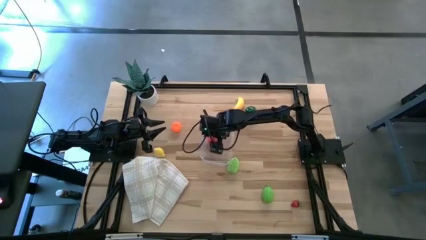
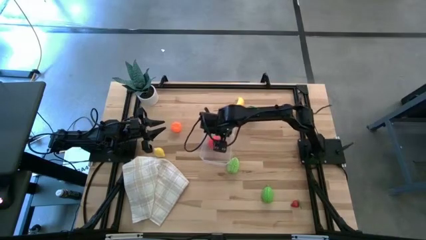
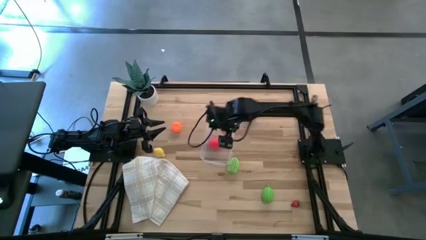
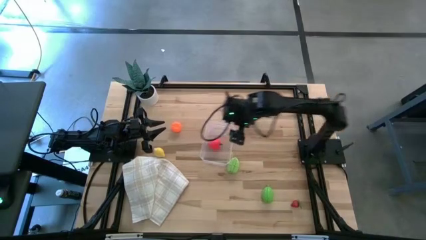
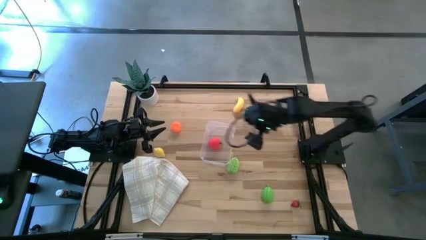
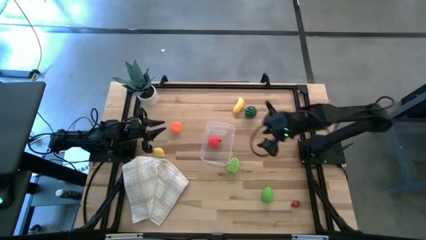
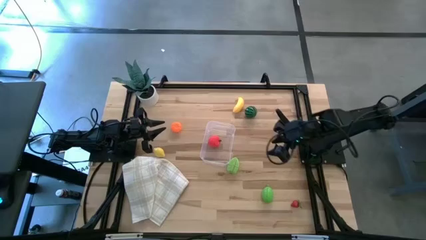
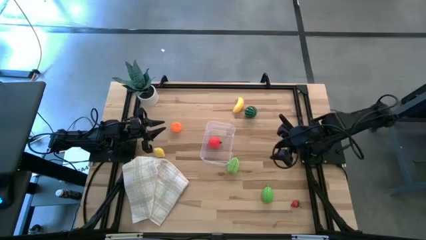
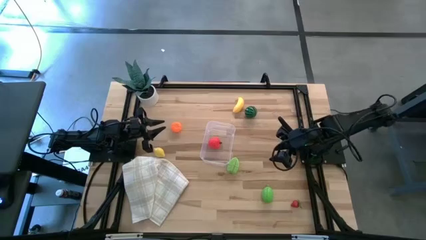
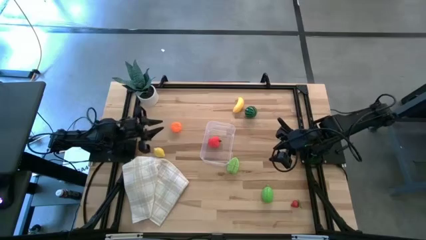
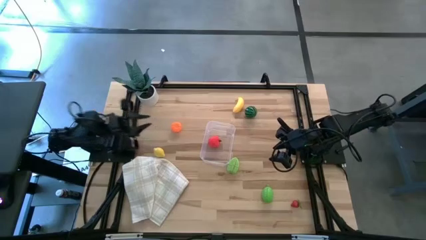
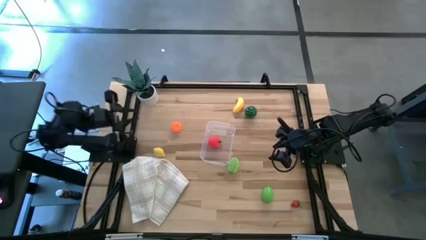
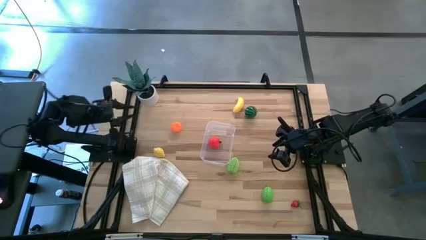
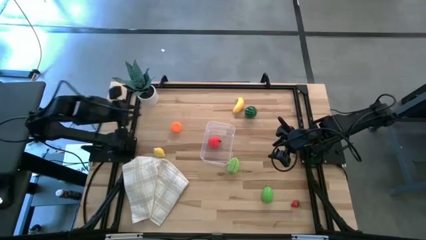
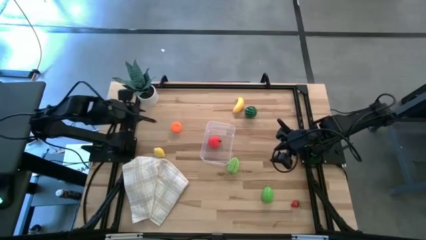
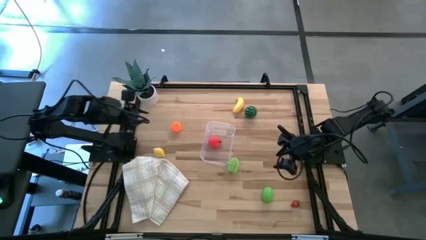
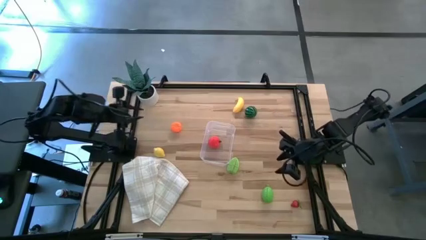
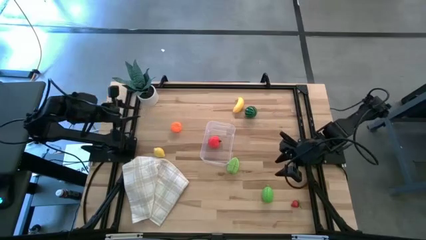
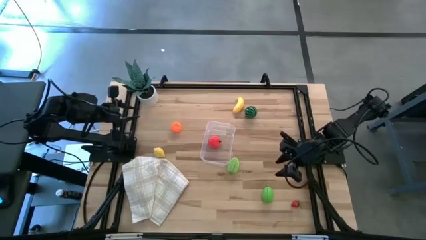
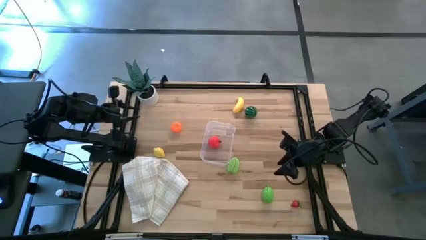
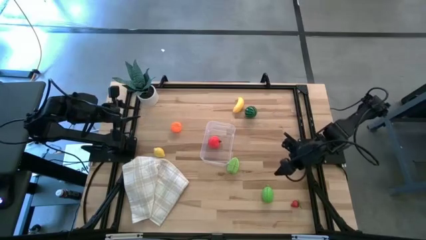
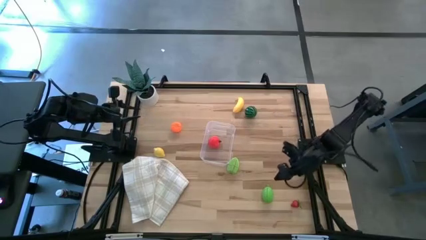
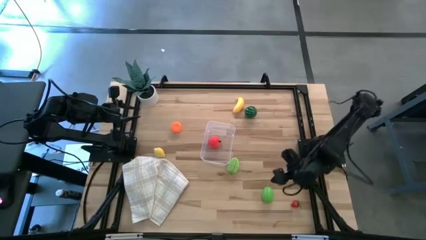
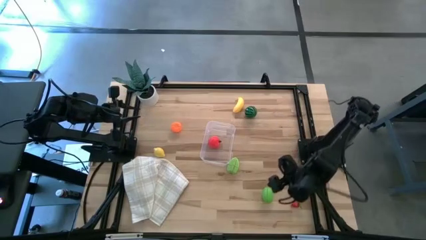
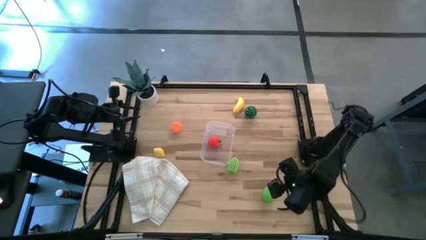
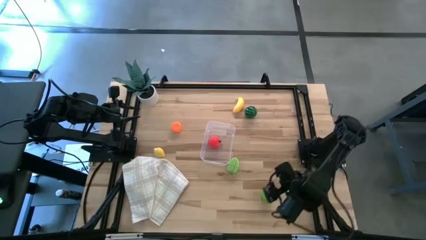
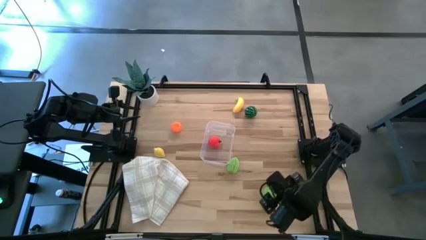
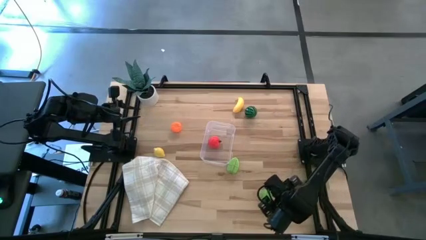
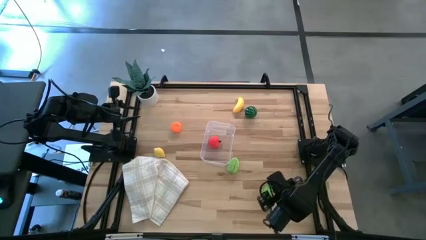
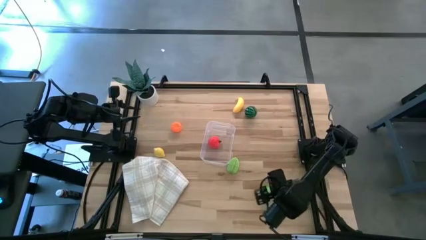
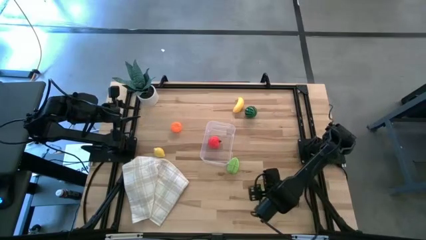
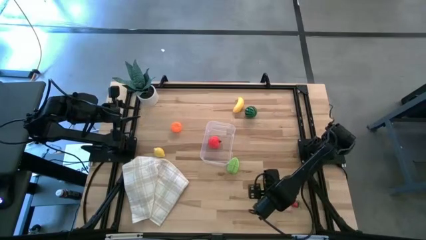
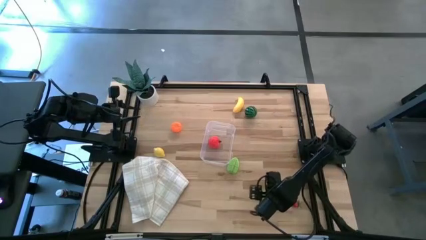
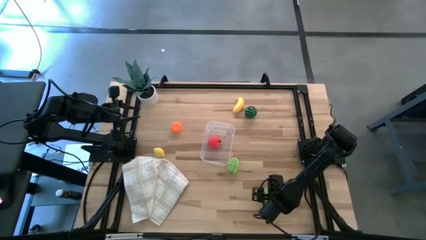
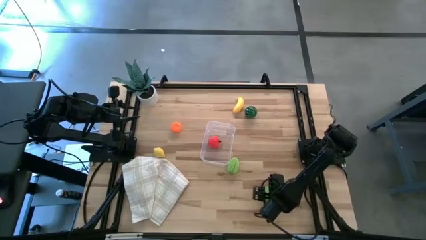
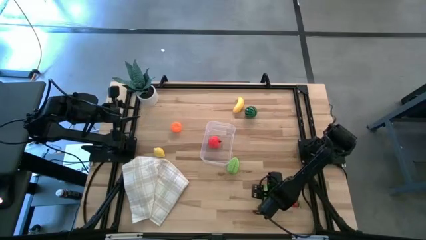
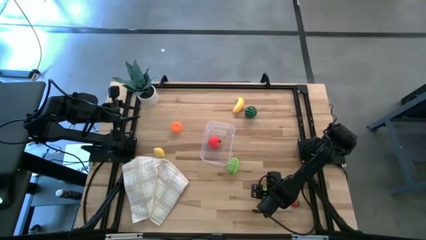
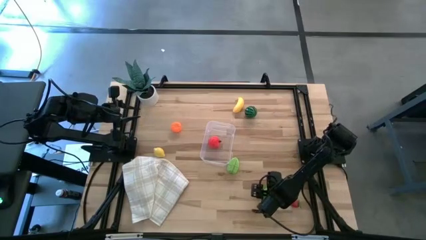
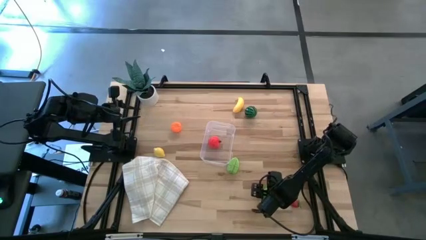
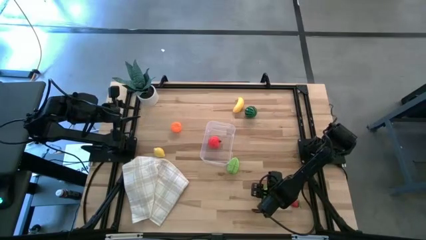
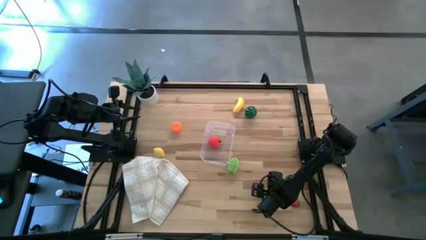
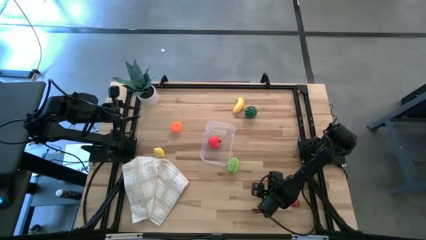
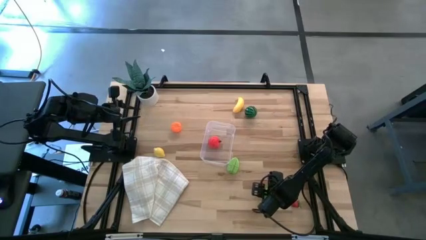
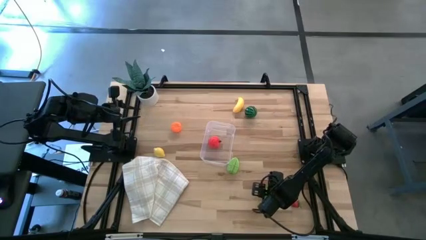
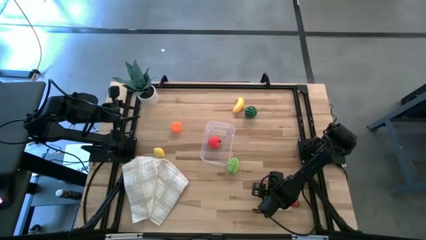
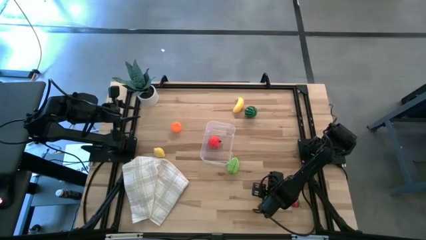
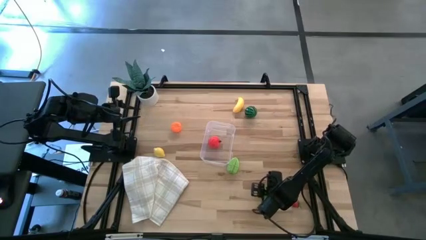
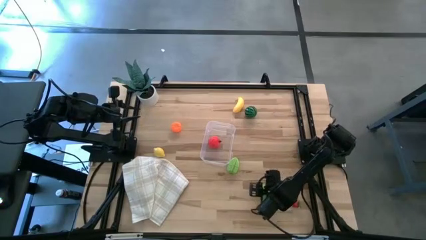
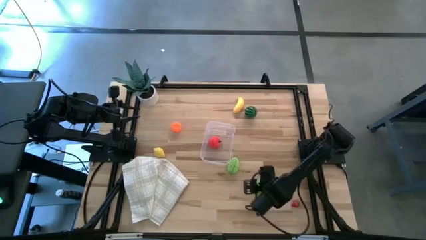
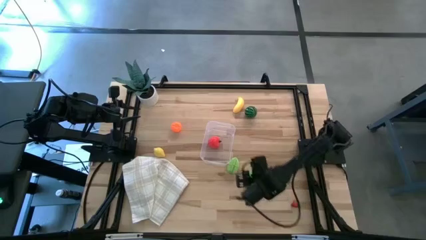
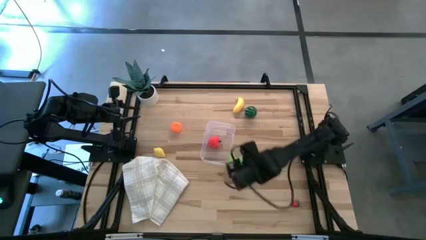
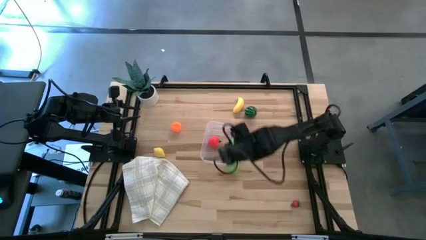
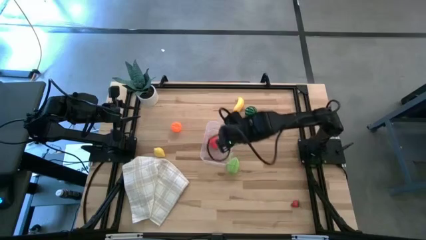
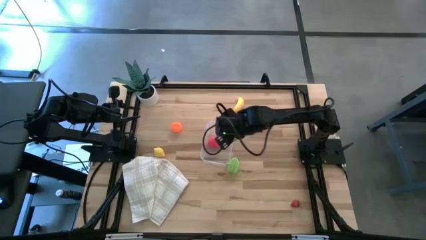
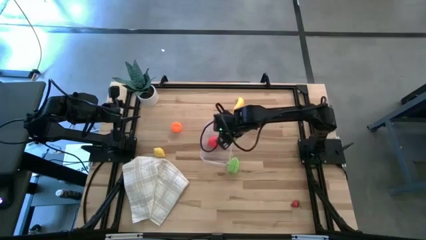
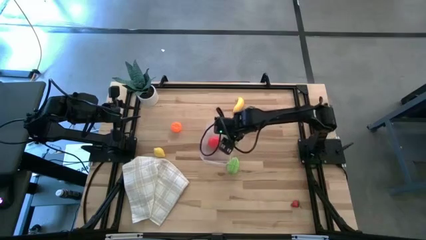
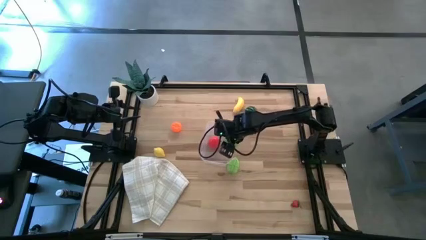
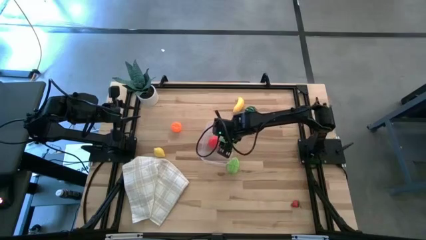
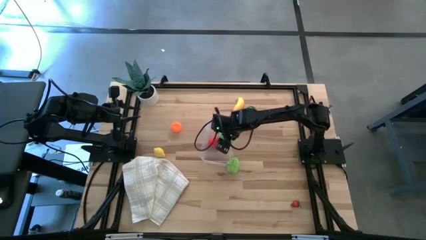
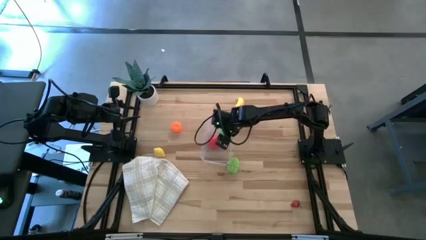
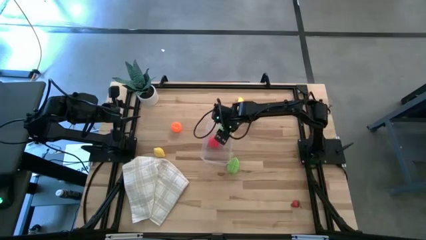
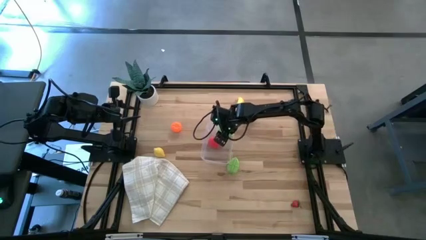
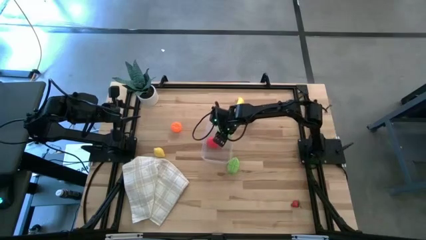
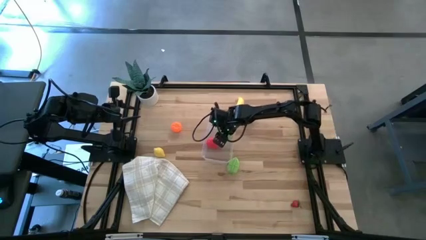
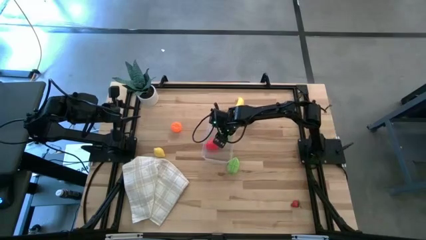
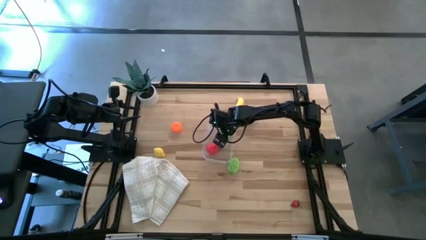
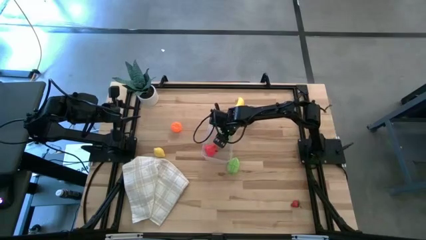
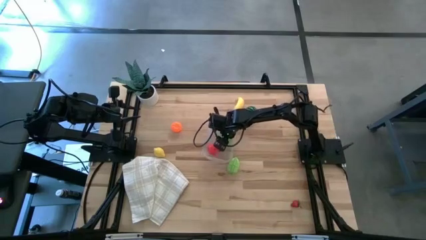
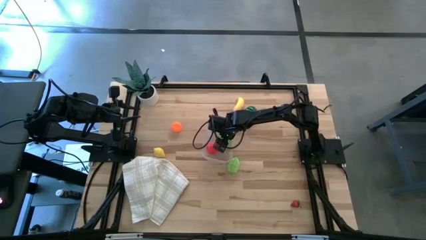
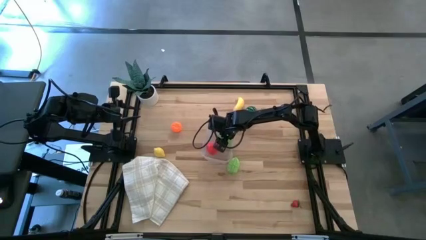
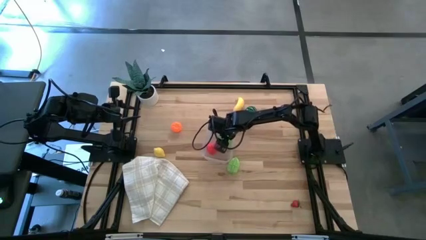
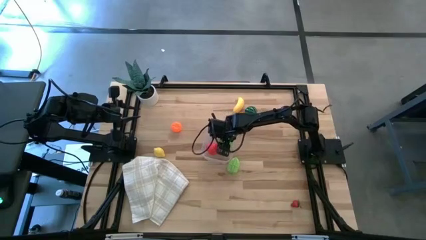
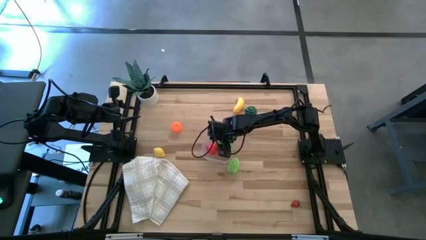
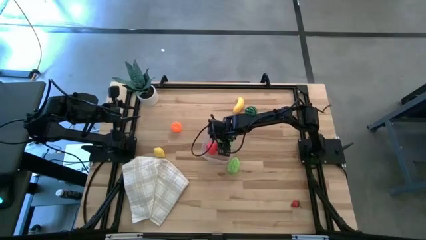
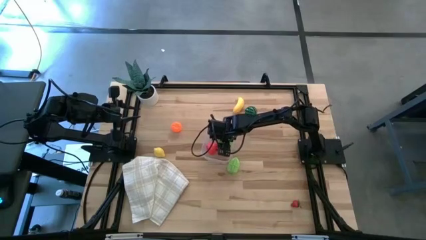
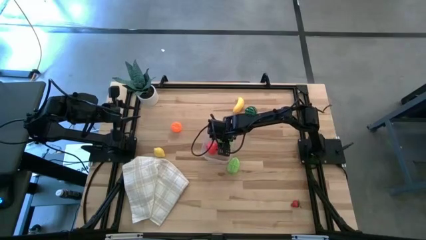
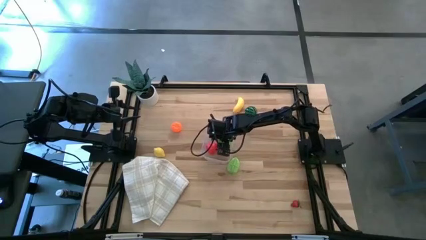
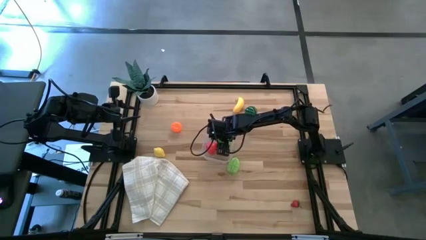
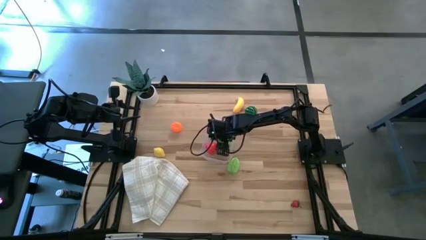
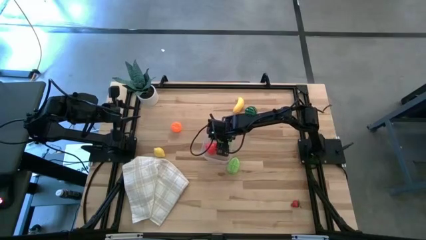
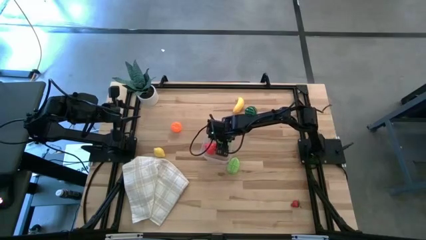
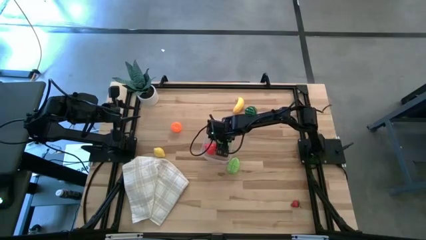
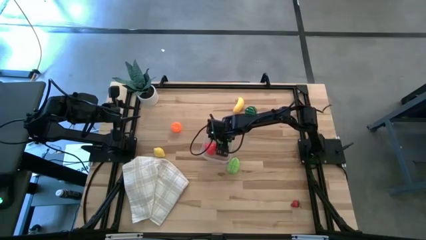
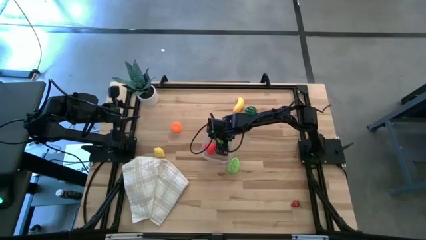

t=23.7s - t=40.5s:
Task: Pick and placing Produce into tupperware
Put the melon into the transparent bin
